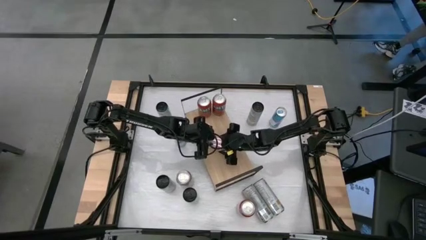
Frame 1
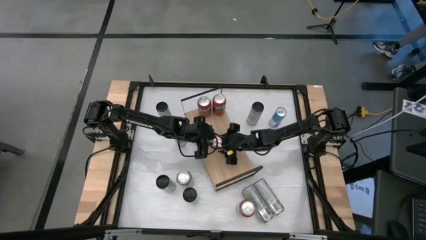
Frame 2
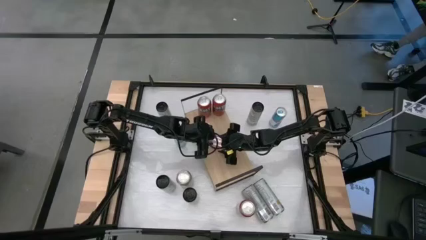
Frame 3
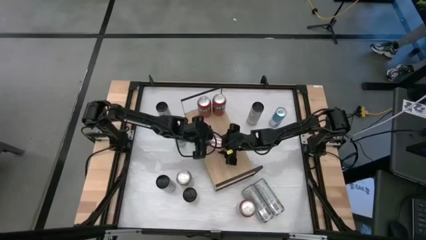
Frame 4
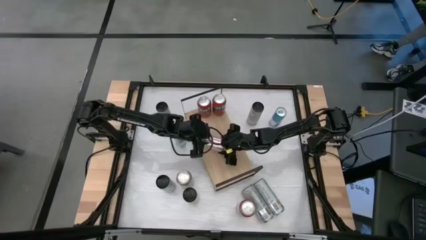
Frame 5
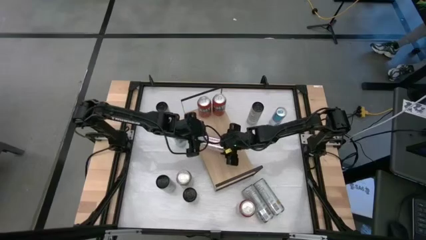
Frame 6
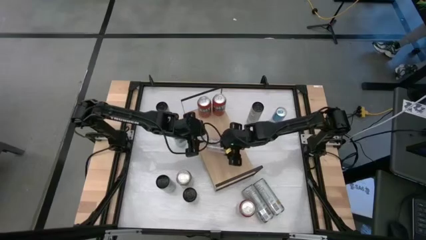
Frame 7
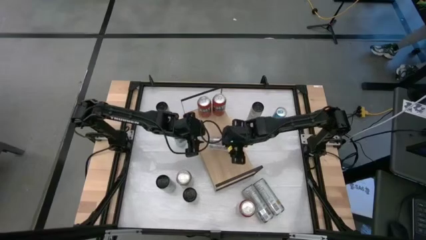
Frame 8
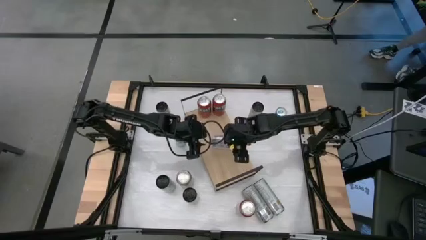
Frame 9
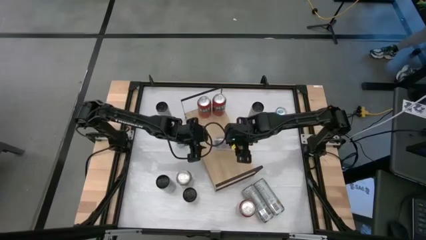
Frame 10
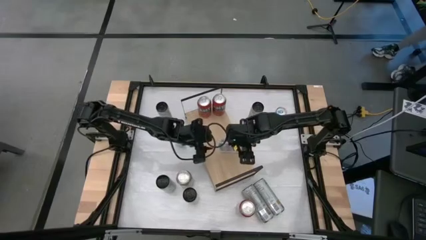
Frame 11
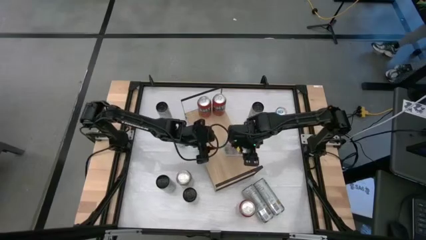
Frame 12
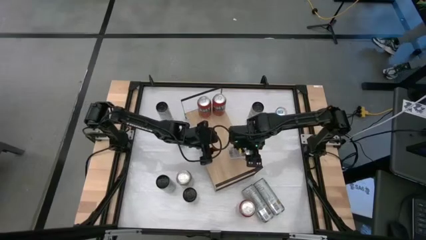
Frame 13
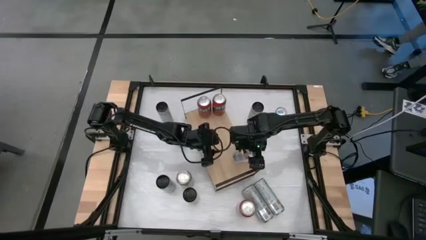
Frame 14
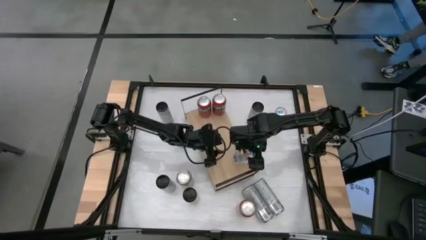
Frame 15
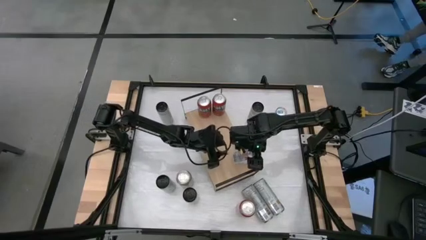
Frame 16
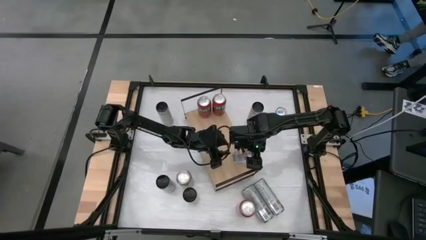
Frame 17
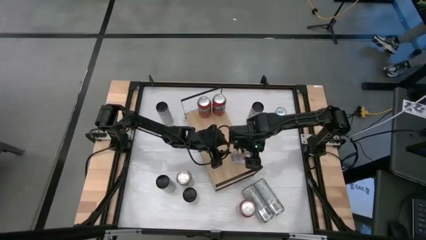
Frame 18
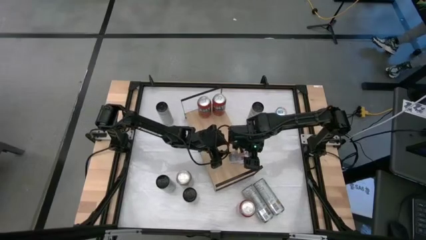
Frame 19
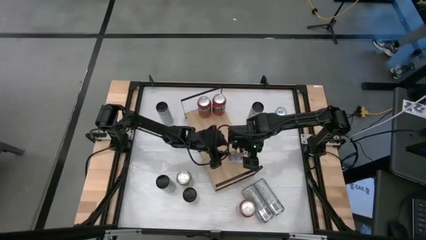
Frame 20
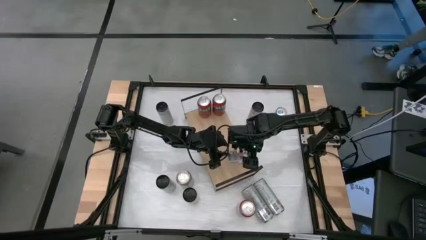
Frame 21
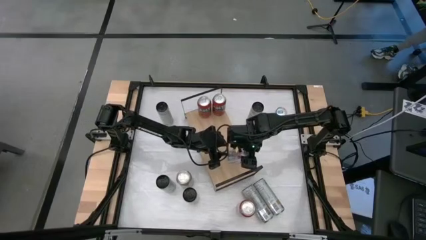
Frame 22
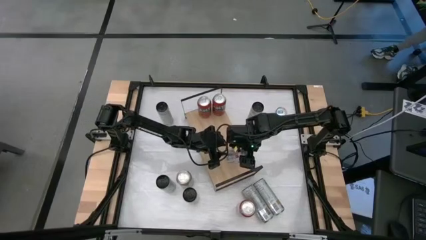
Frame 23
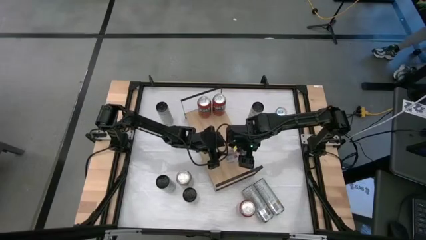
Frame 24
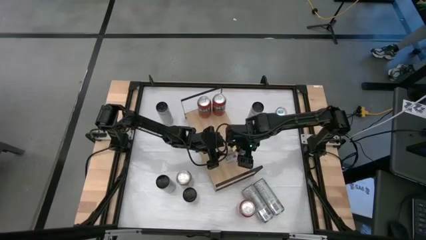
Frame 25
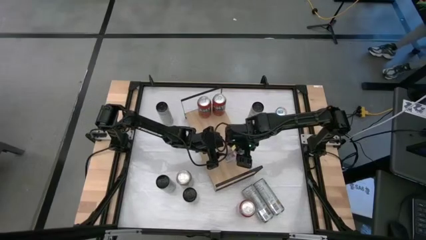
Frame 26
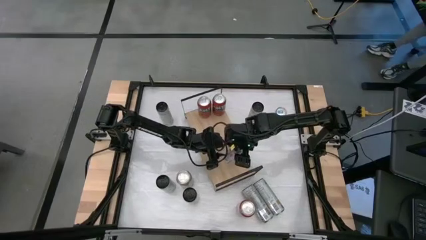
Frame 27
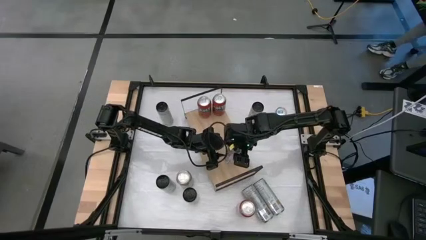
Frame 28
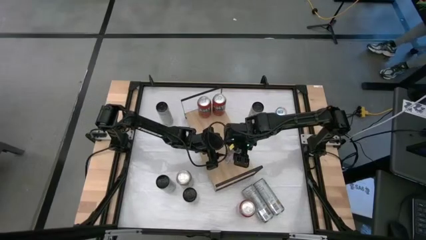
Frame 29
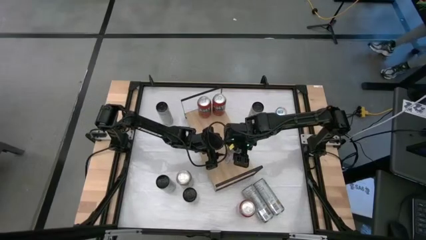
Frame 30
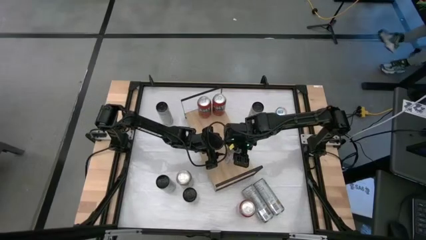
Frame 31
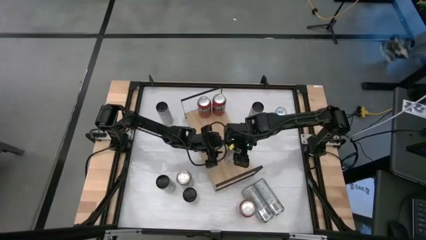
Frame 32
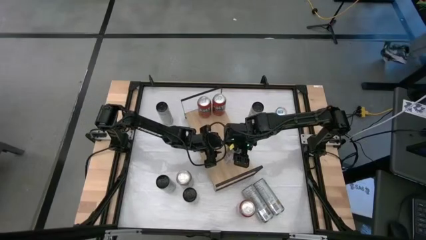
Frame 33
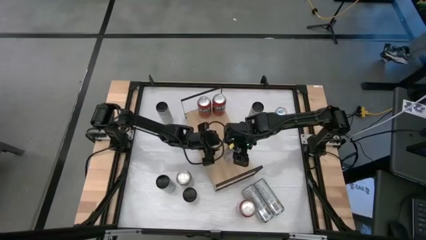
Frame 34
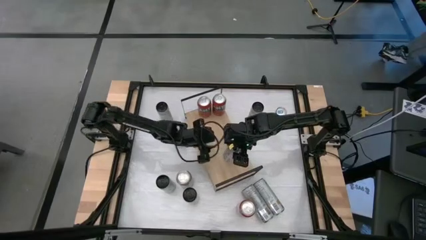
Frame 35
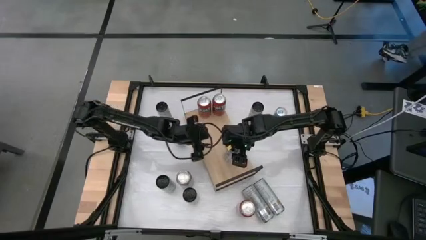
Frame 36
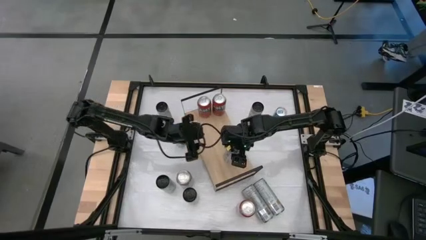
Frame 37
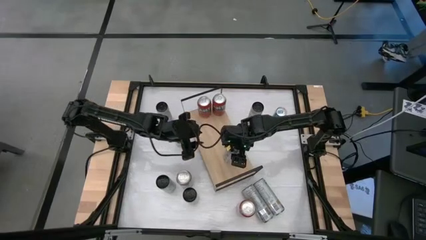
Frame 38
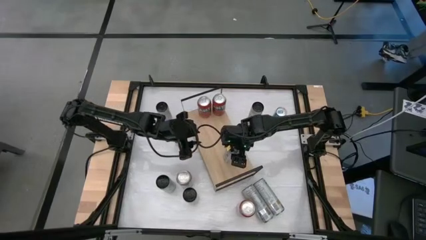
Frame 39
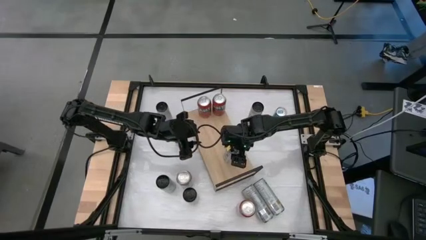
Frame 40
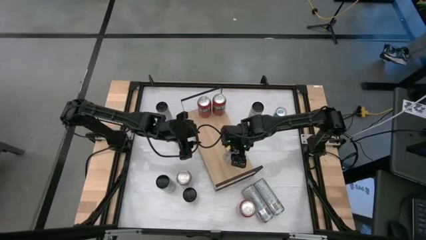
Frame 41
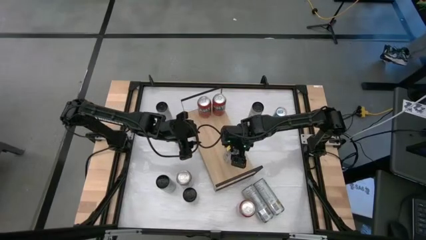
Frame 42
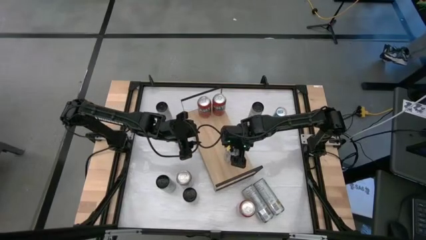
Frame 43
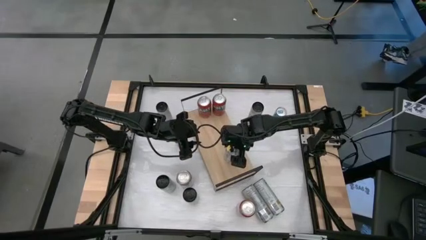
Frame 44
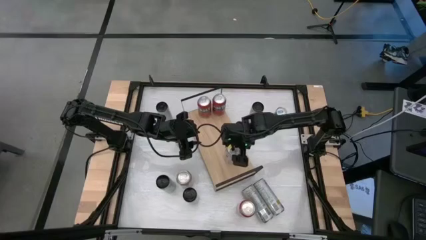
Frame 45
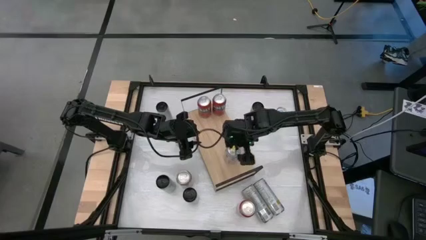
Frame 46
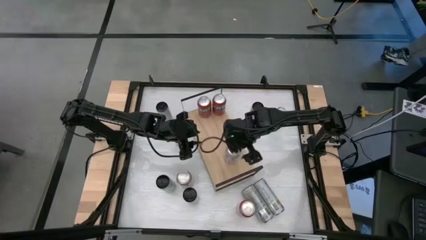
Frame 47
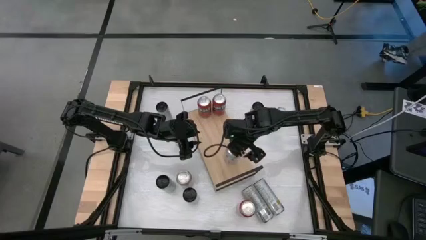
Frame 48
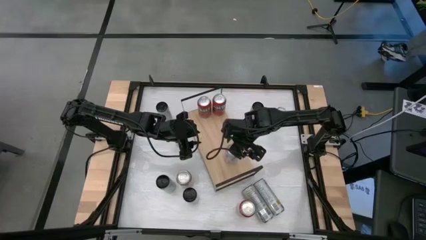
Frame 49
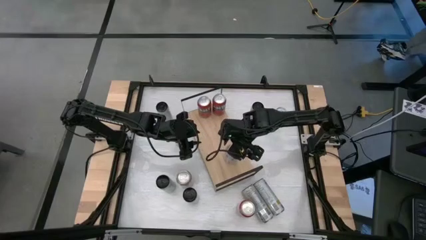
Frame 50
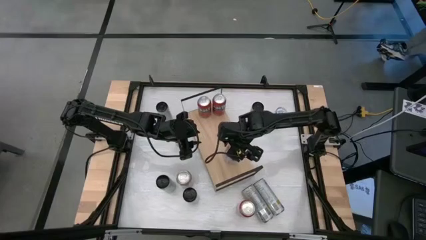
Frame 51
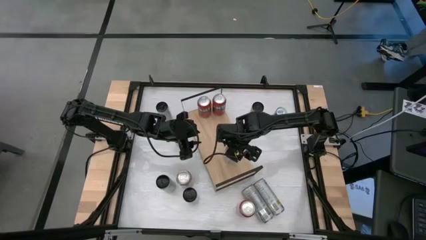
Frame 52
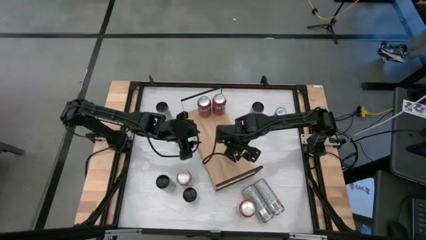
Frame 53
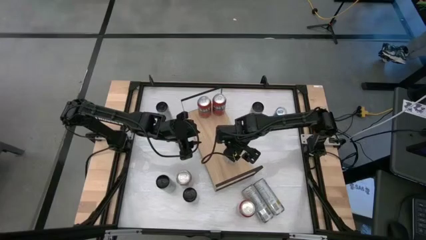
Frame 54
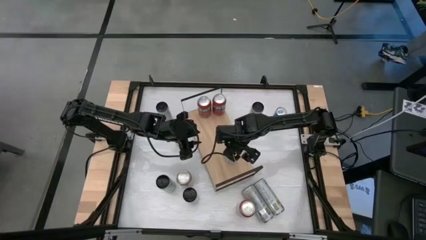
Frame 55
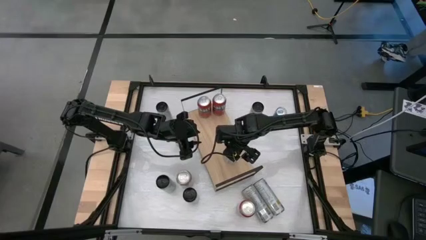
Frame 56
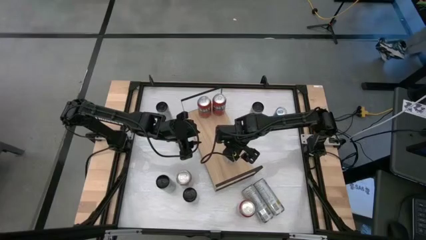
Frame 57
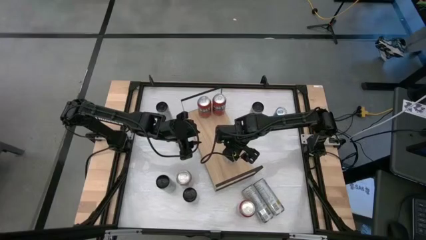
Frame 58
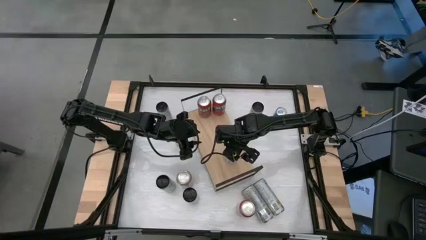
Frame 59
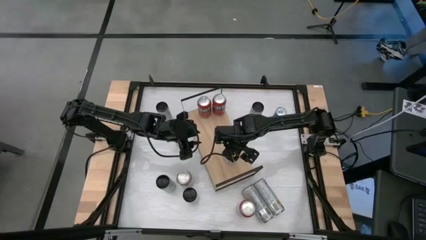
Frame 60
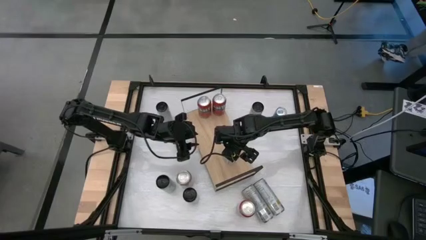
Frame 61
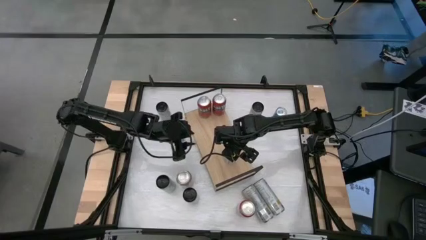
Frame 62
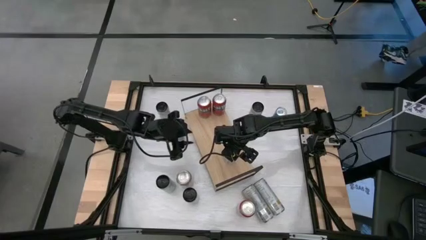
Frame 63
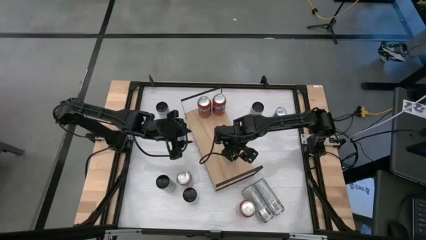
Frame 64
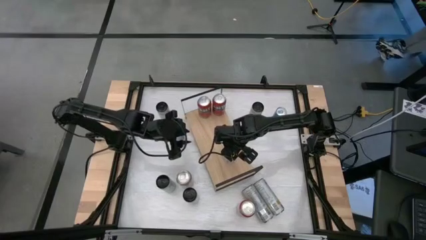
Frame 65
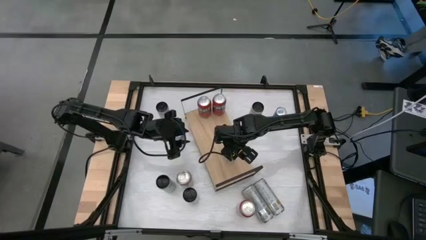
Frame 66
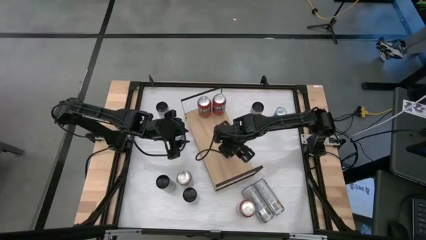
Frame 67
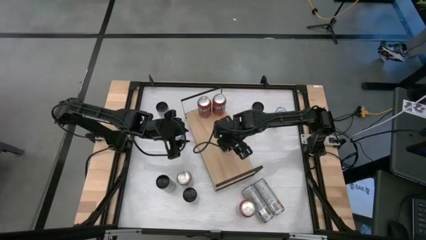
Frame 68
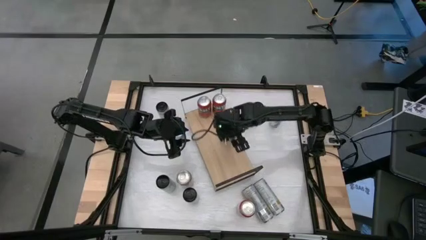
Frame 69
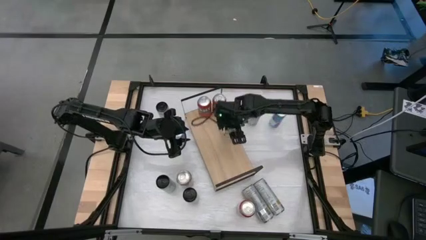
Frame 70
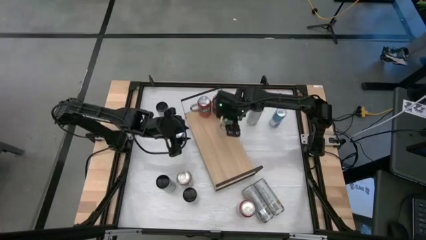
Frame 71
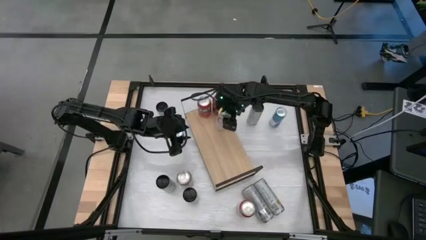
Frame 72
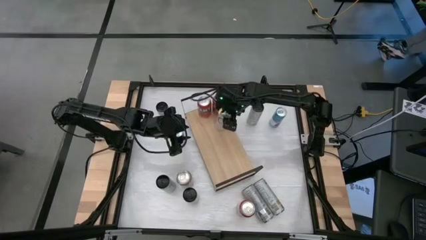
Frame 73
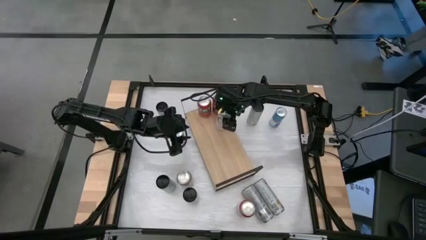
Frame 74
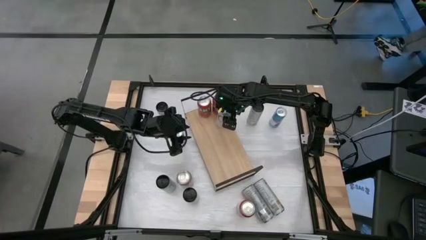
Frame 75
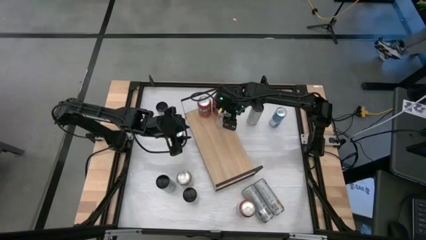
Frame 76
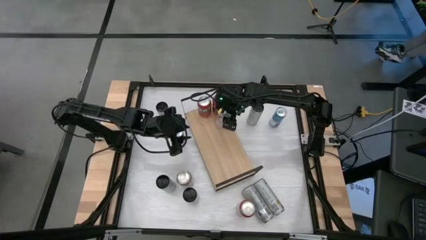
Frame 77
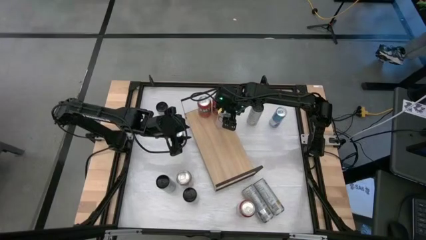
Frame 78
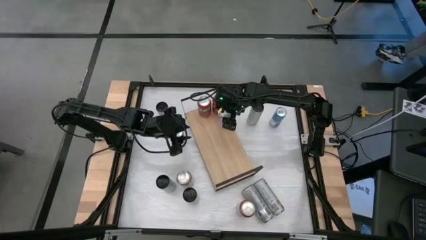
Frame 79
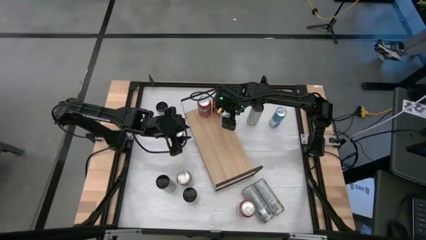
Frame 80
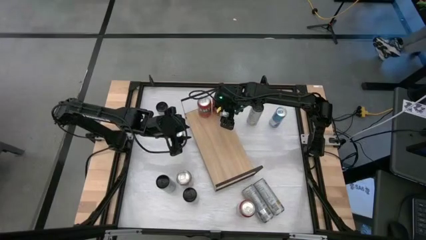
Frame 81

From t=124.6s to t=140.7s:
Task: Place canned beverage on shelf
Put the top right white soda can on the shelf

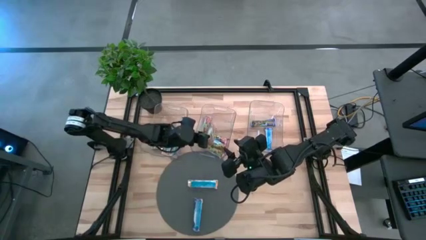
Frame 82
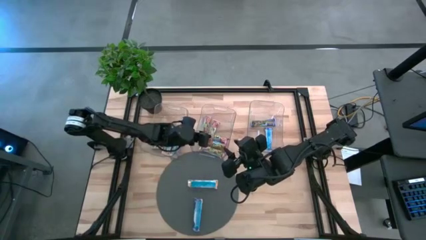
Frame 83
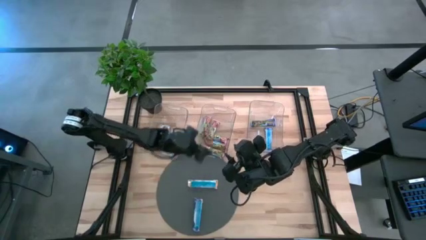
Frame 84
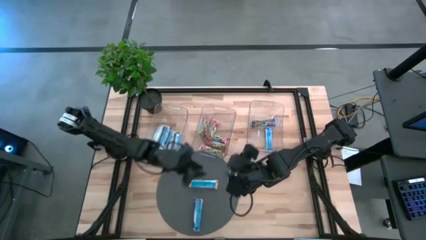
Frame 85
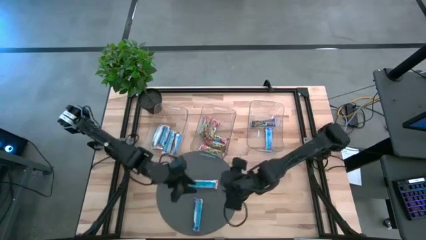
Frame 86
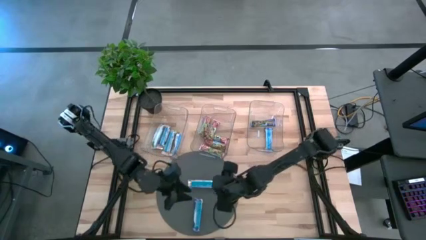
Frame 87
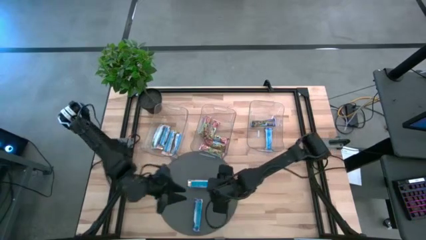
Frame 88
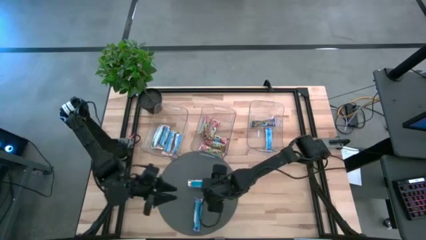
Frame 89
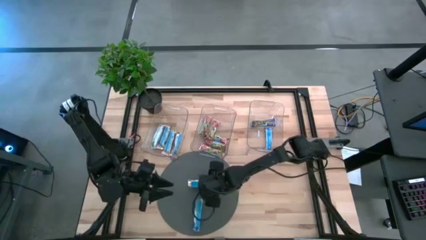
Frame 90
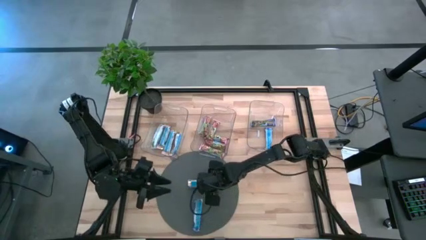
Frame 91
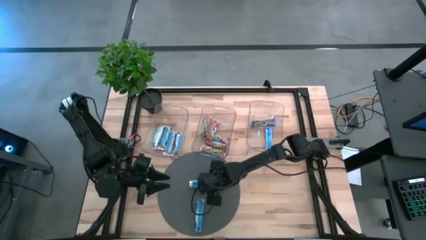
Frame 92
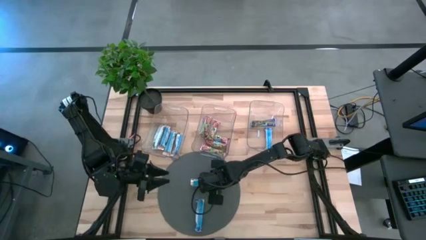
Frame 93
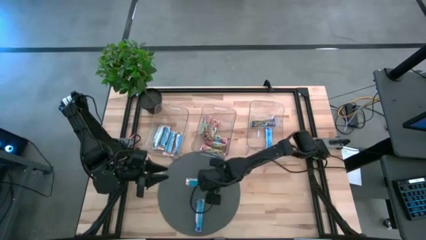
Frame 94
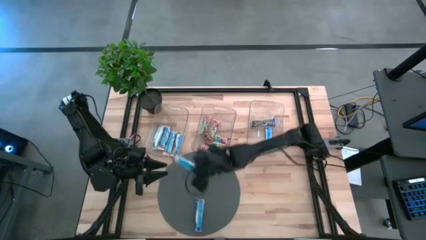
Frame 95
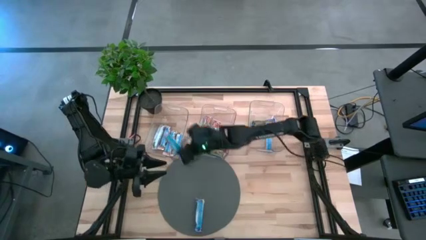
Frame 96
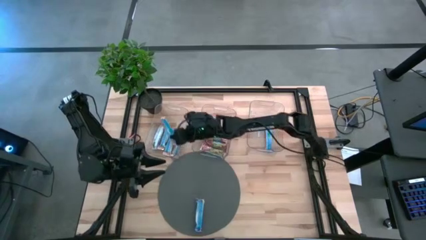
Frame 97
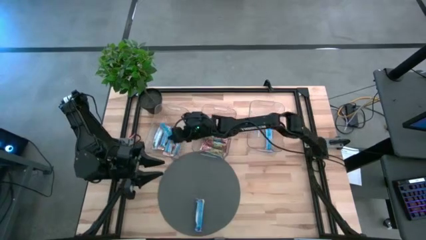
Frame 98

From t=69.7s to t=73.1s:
Task: Pick and place Granola Bars by type
Put the yellow granola bar into the left transparent bin
